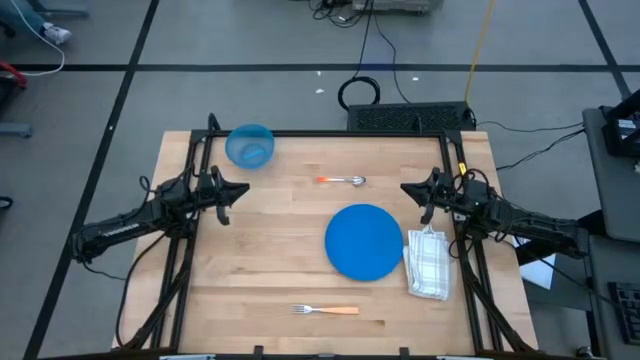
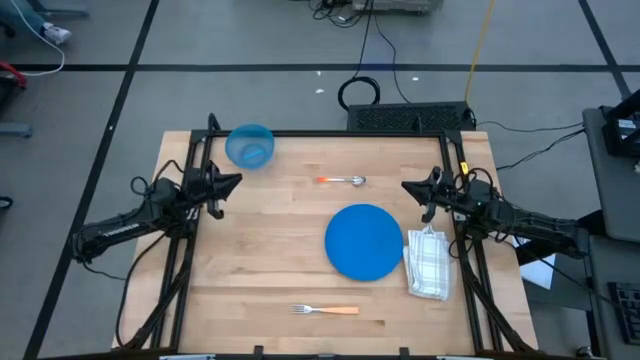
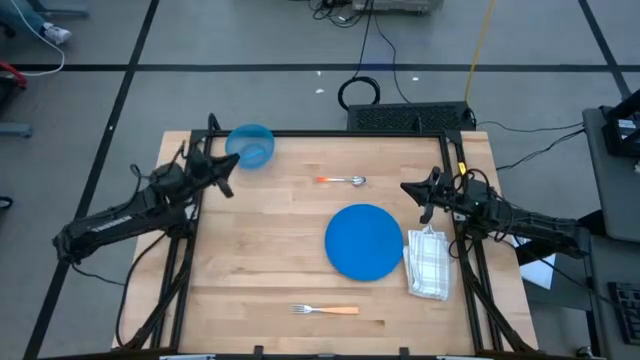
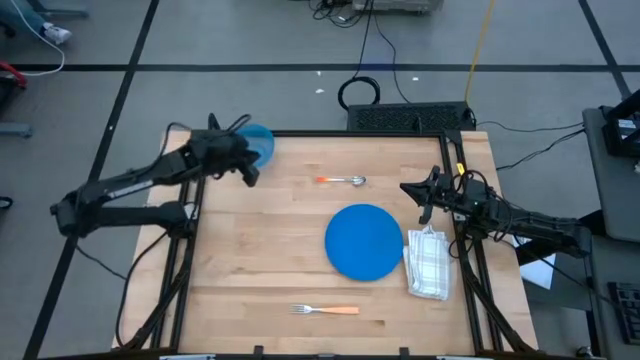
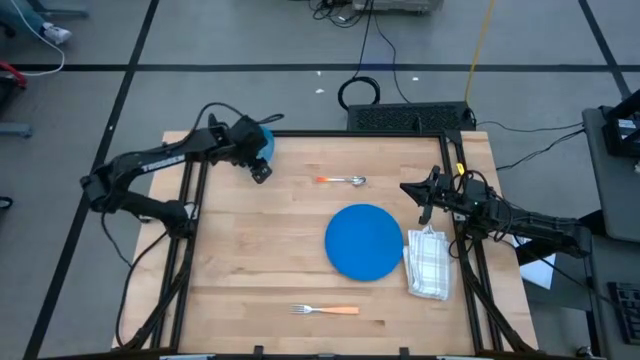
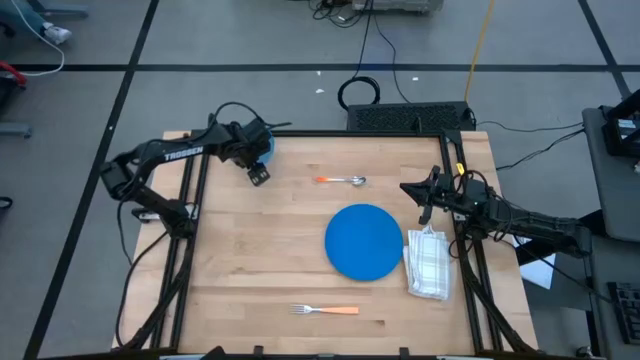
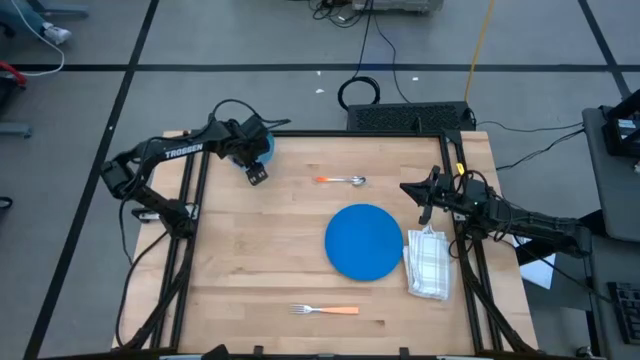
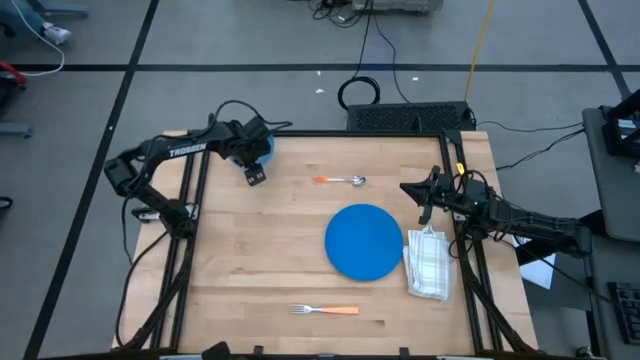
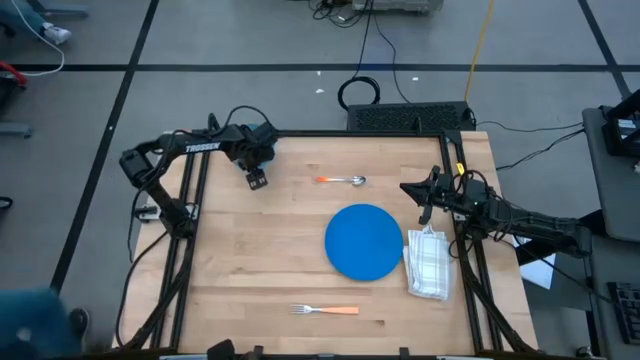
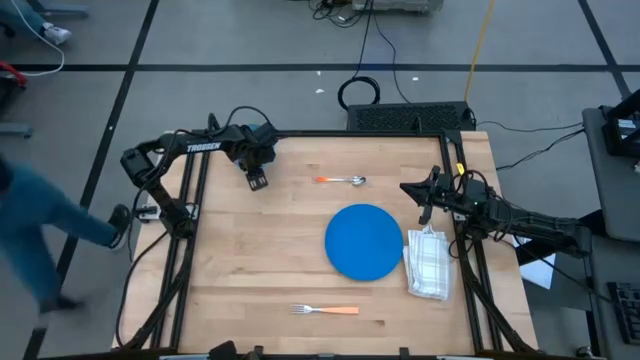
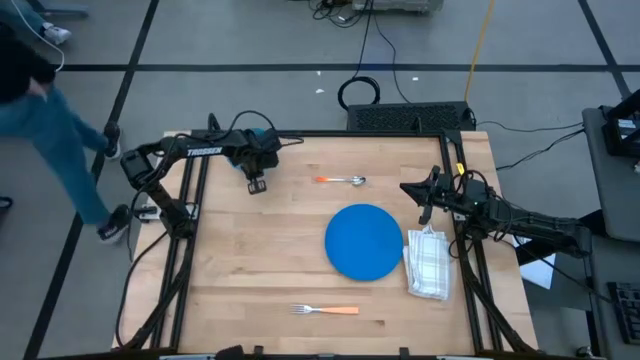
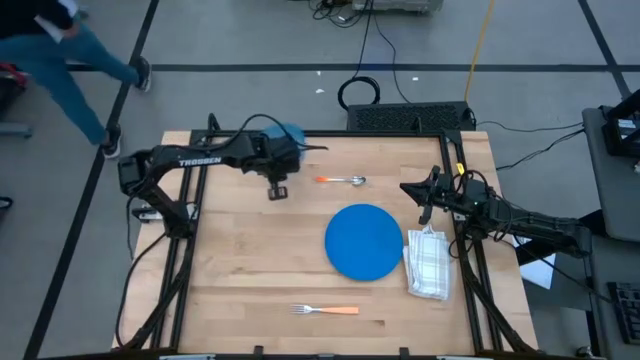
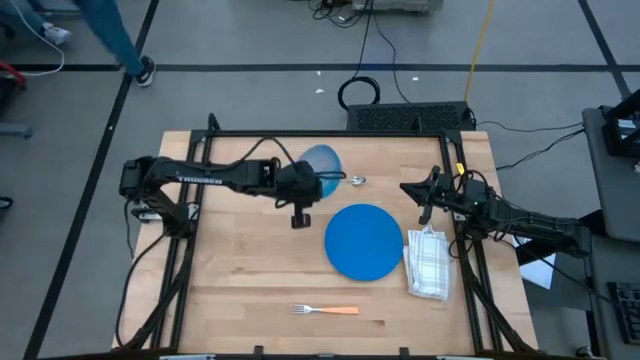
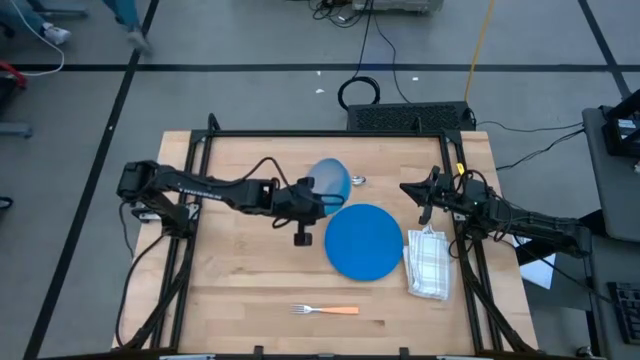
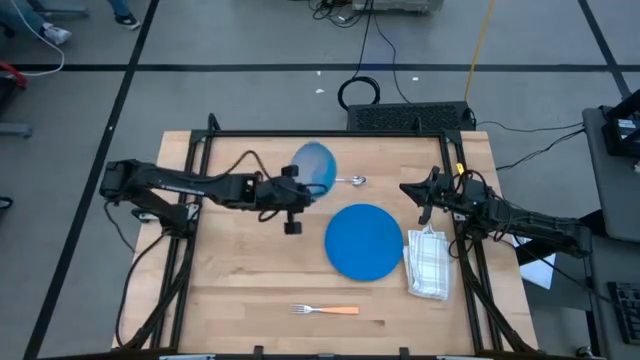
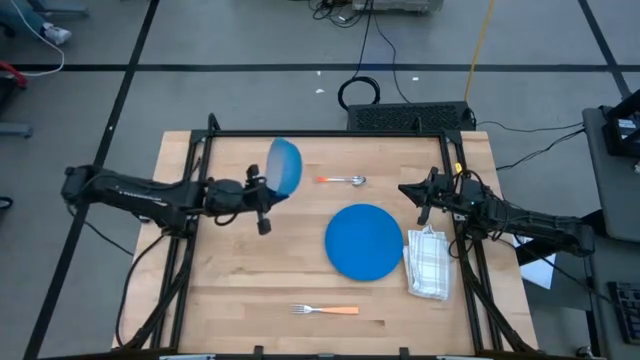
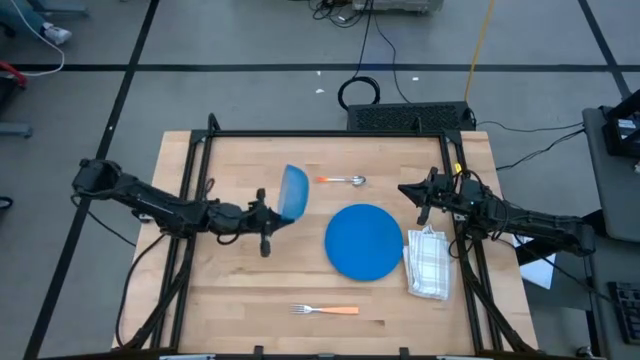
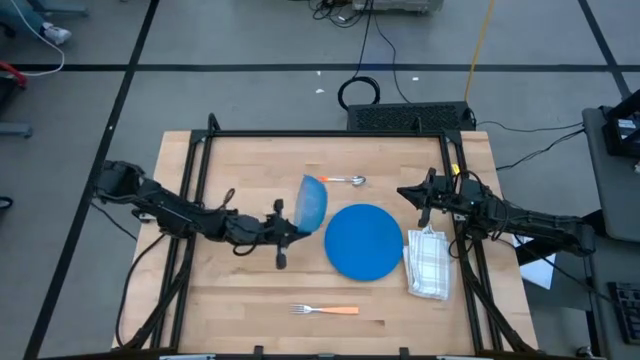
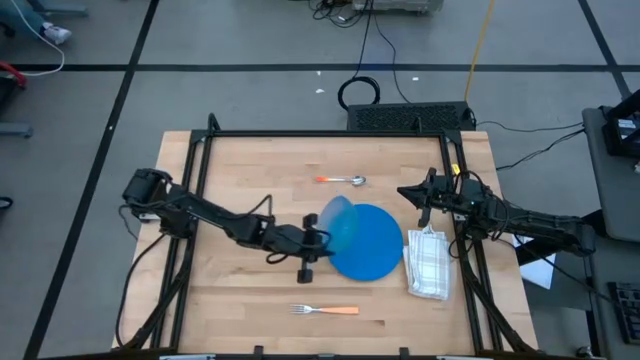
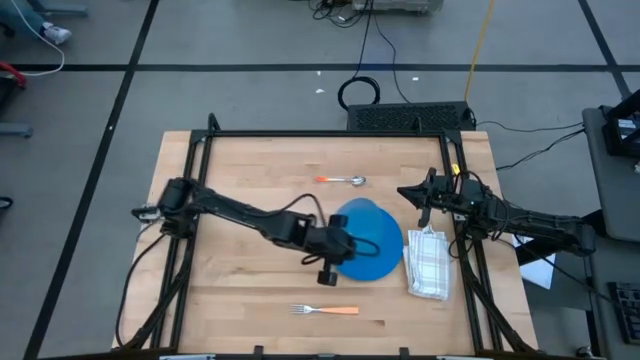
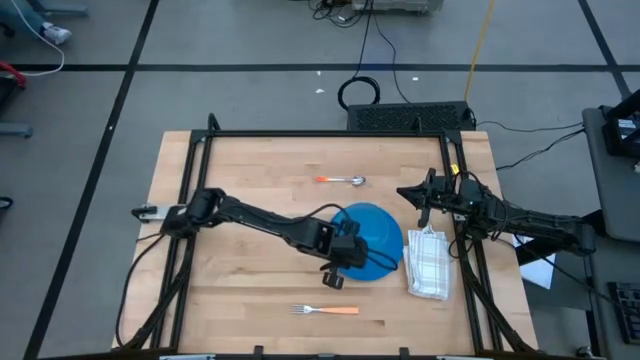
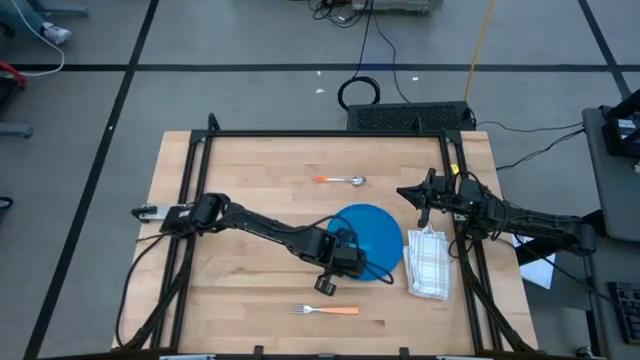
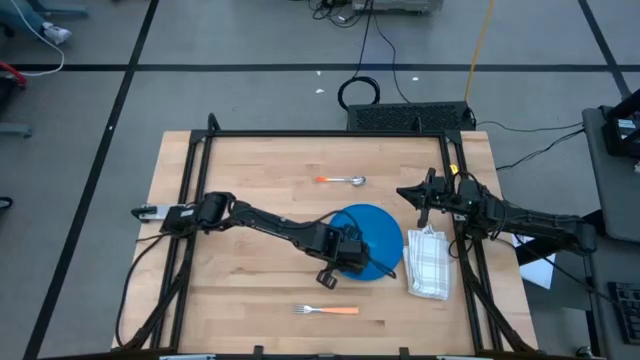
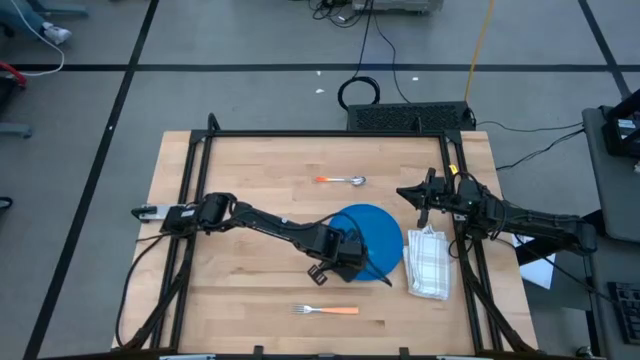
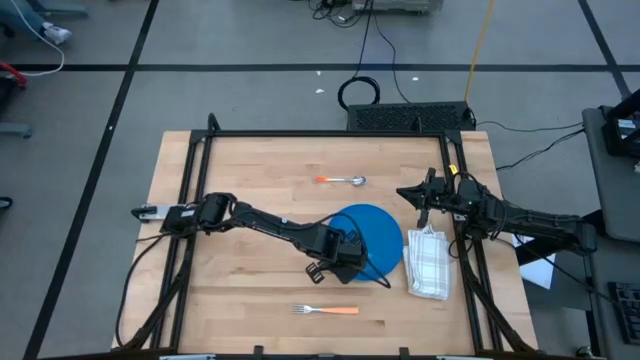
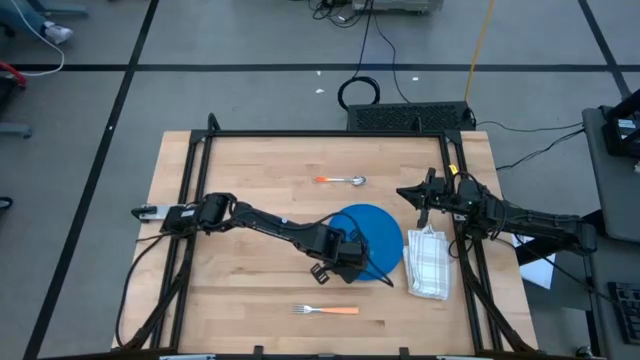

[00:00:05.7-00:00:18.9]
Task: Set table place
Put the blue bowl on the blue plate

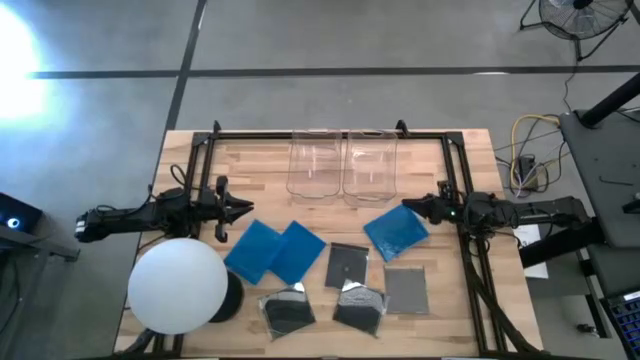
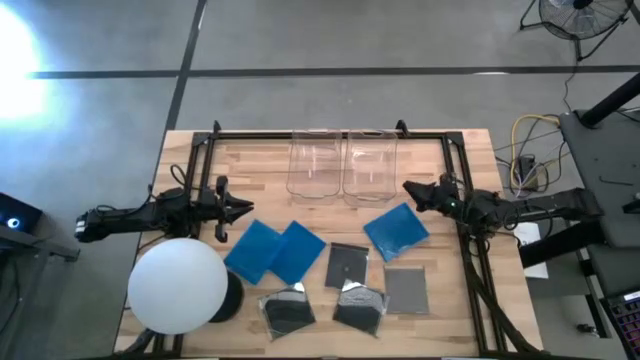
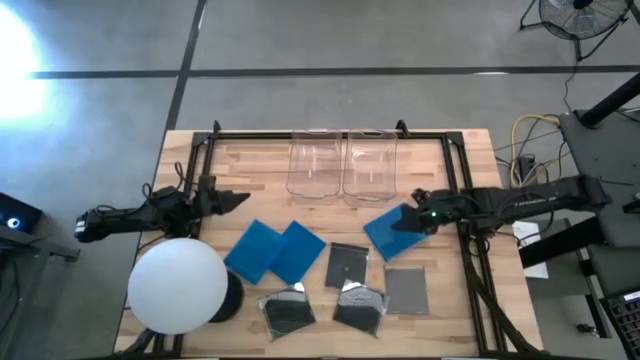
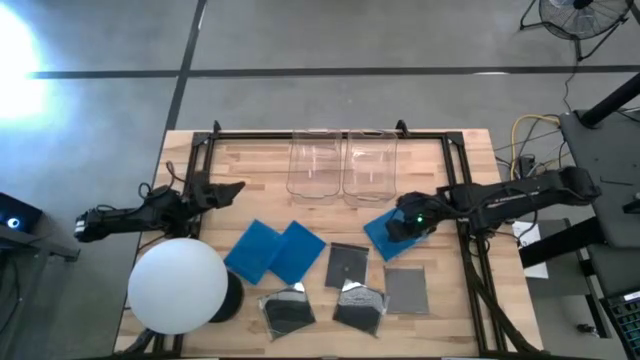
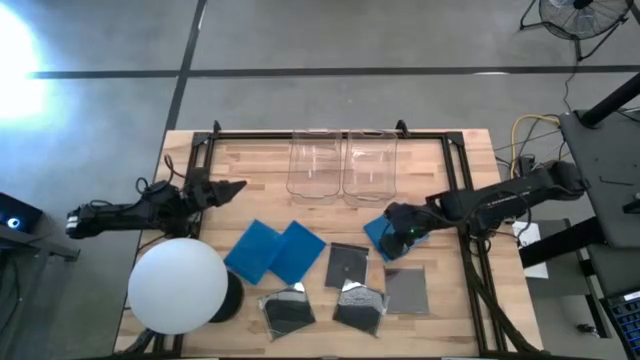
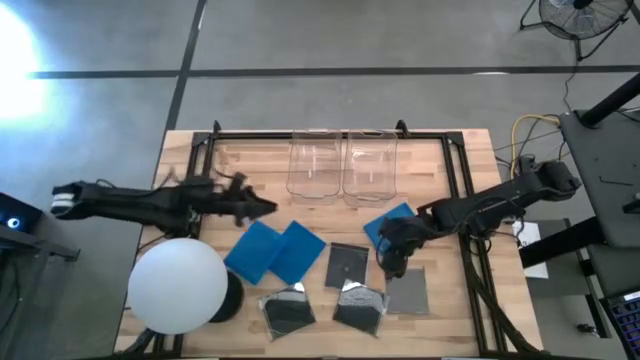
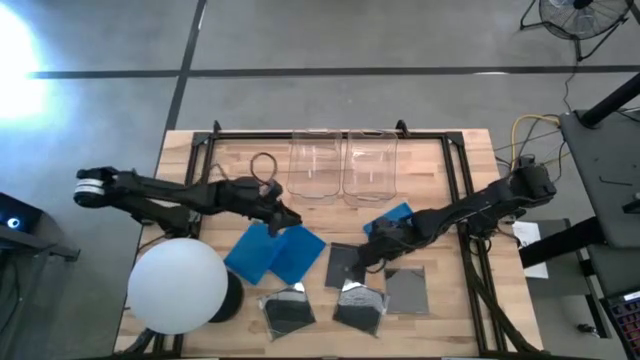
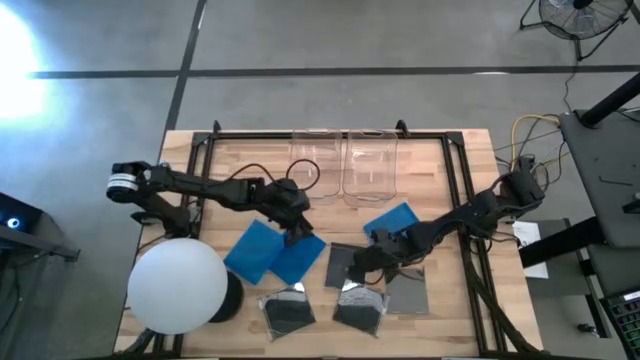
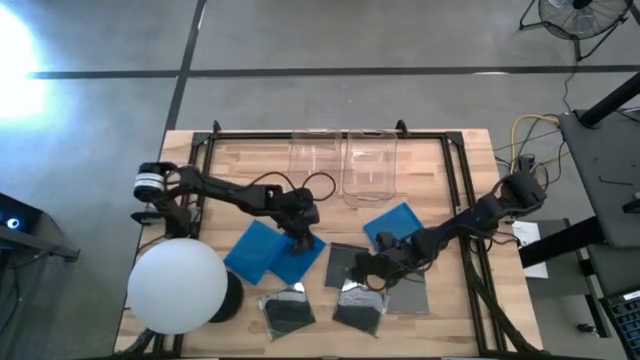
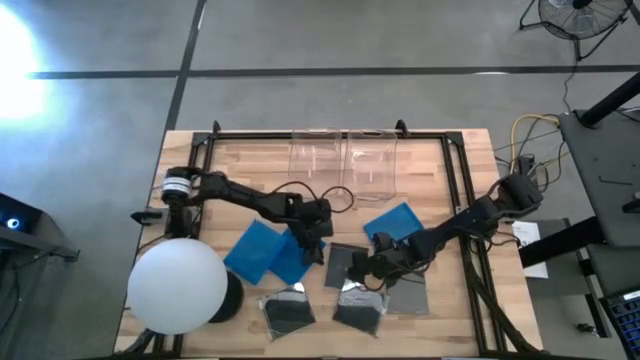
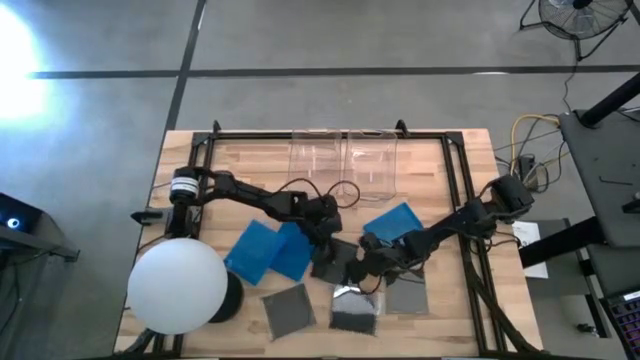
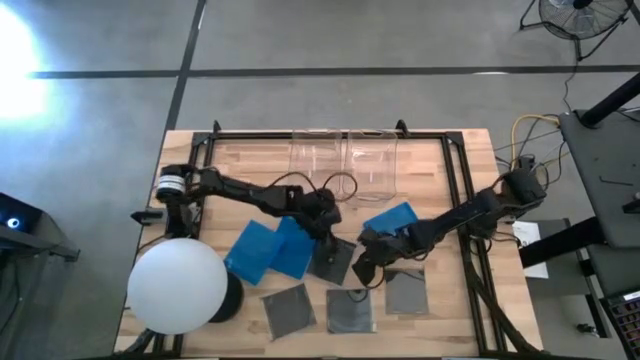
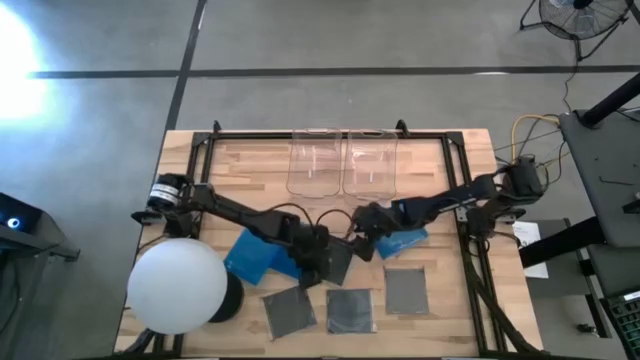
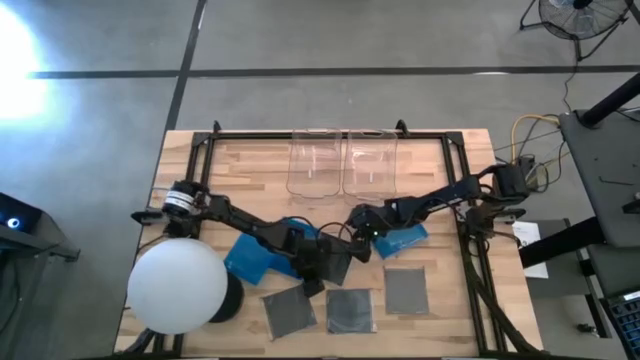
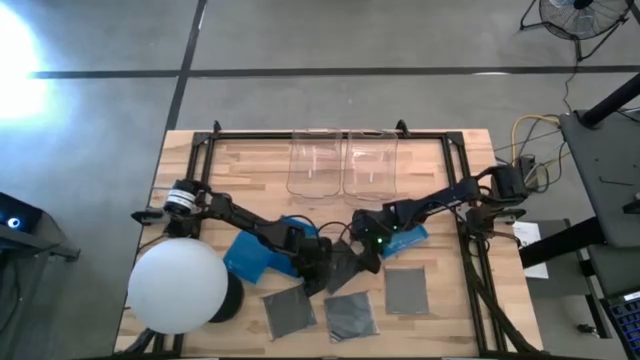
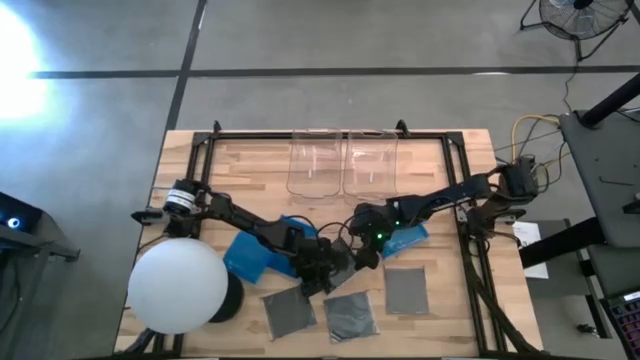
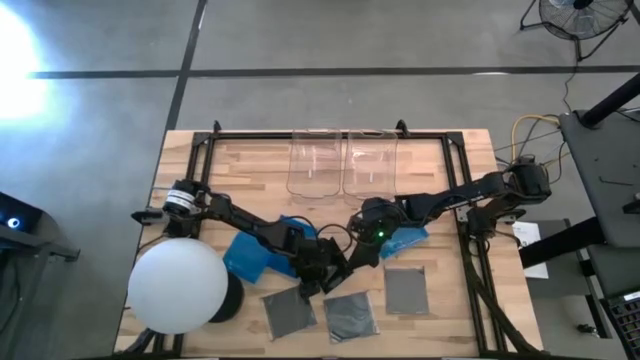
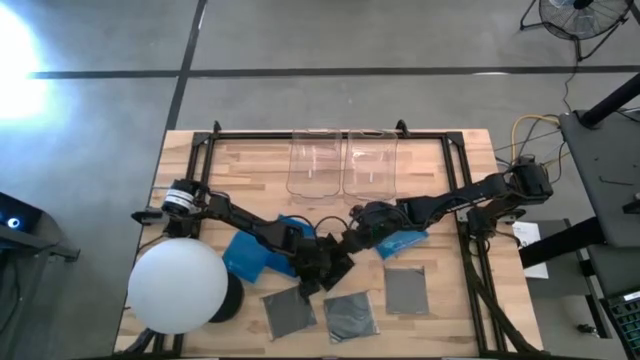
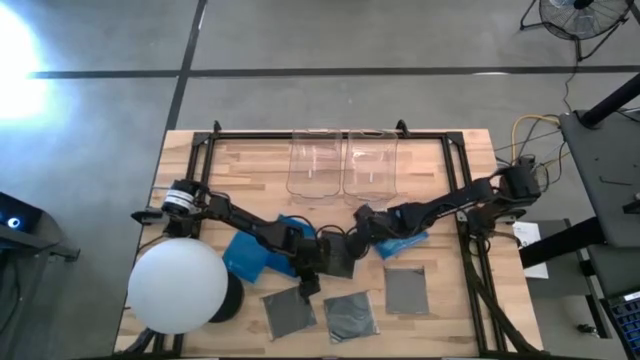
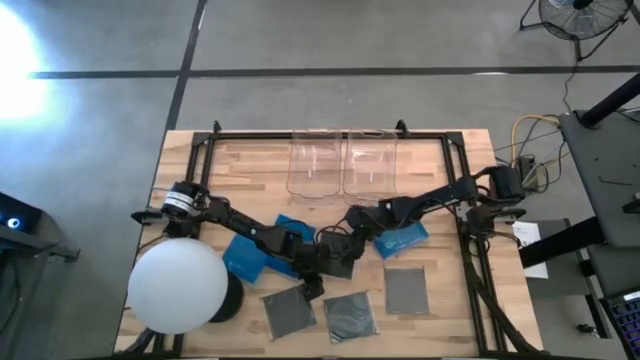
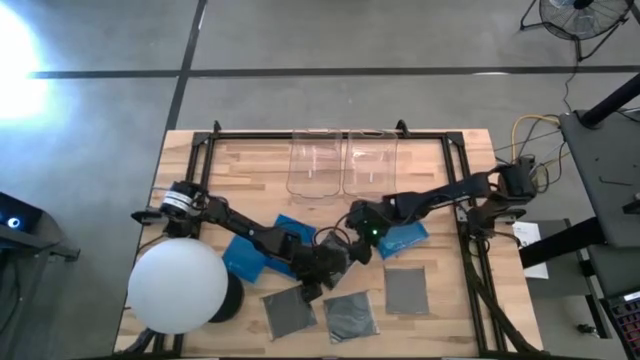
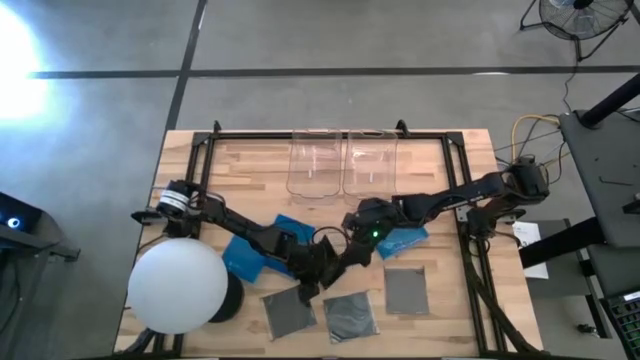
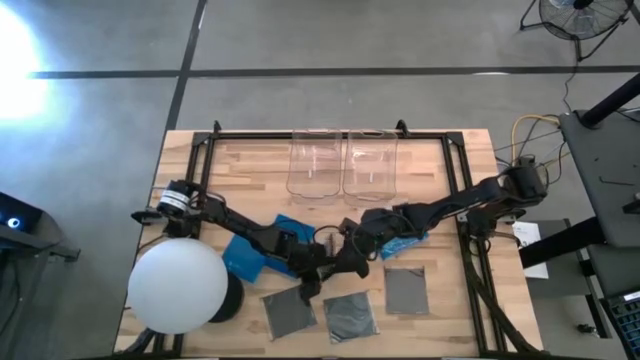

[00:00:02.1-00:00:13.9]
Task: Pick & place jewel cases by type
Put the black CD case into the right transparent bin
